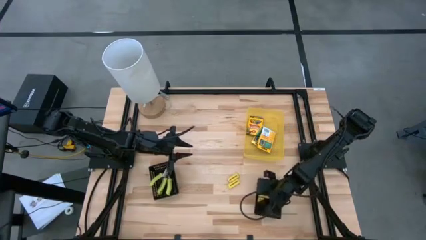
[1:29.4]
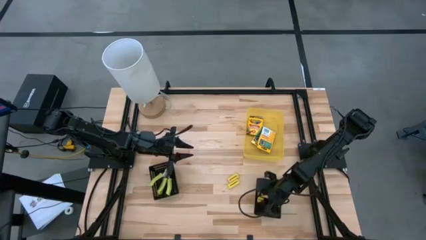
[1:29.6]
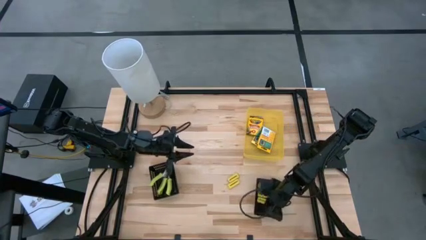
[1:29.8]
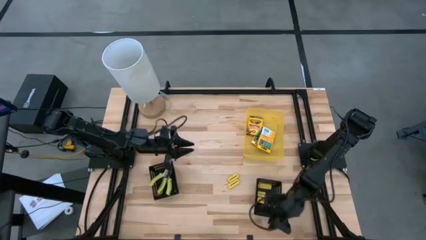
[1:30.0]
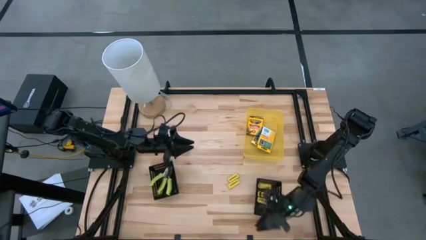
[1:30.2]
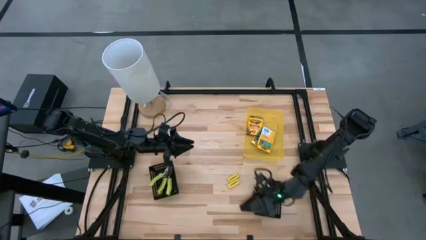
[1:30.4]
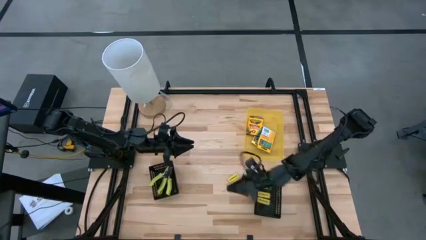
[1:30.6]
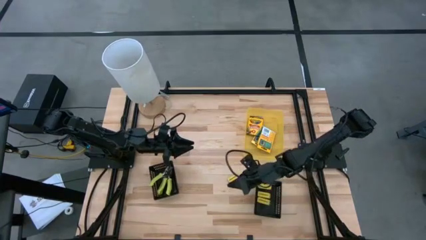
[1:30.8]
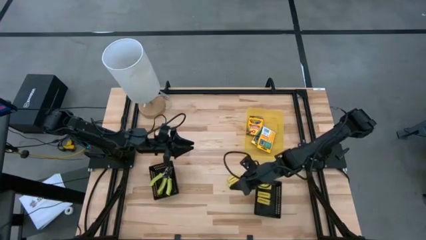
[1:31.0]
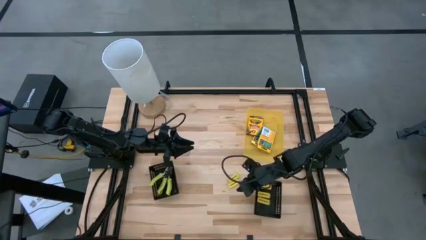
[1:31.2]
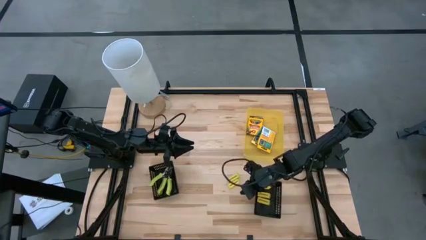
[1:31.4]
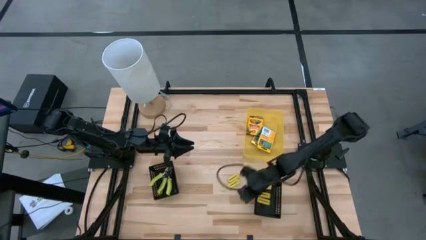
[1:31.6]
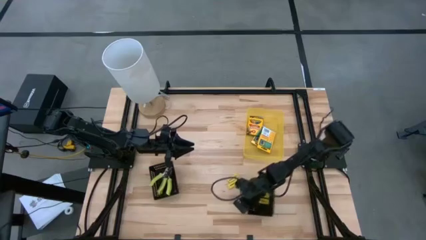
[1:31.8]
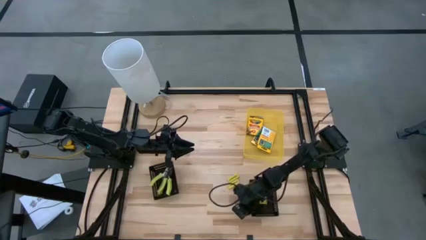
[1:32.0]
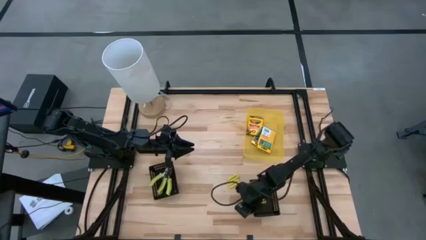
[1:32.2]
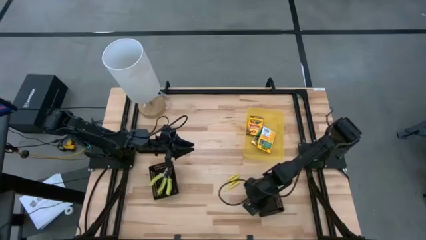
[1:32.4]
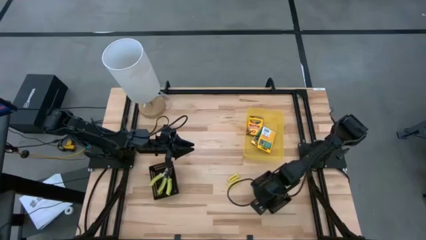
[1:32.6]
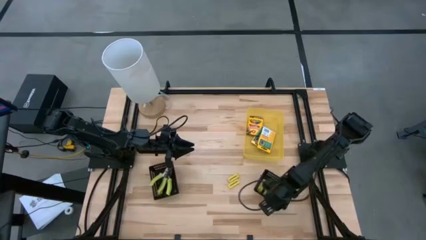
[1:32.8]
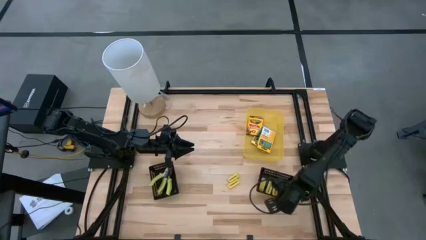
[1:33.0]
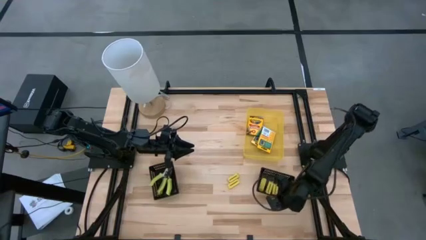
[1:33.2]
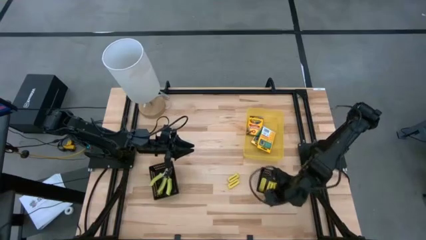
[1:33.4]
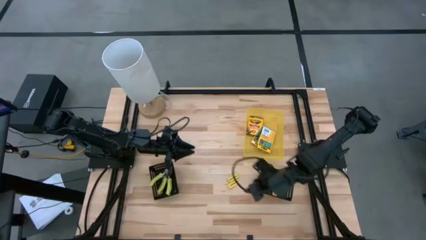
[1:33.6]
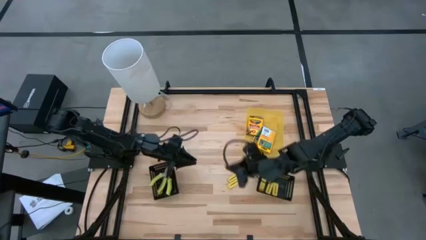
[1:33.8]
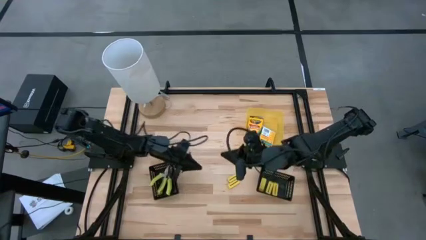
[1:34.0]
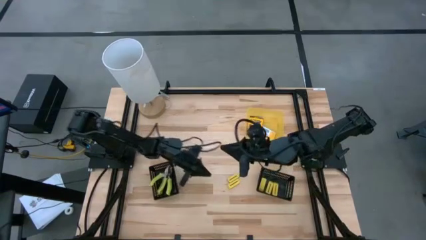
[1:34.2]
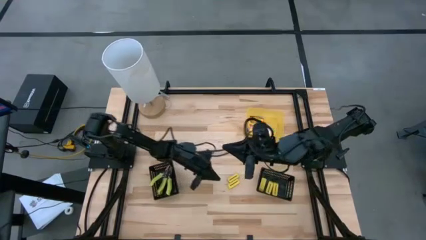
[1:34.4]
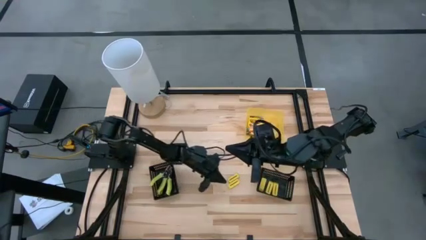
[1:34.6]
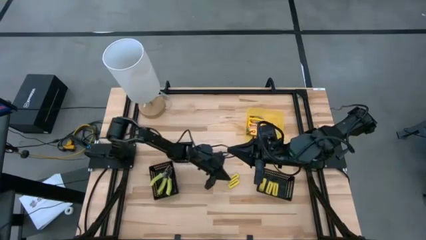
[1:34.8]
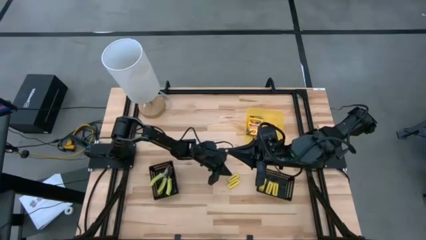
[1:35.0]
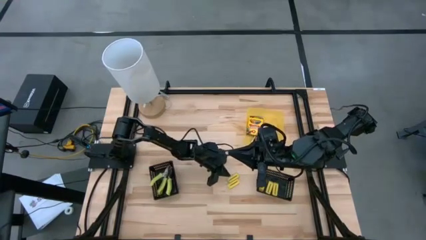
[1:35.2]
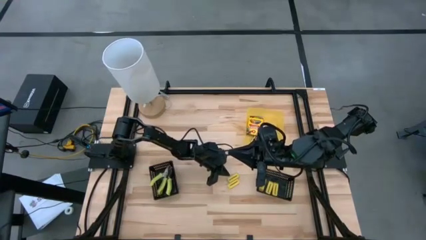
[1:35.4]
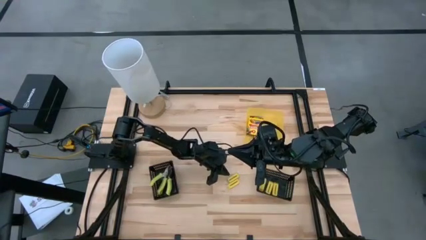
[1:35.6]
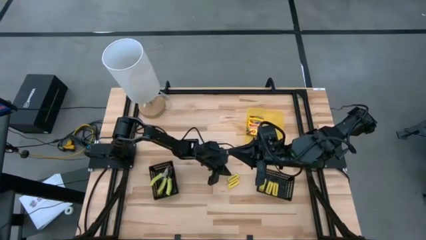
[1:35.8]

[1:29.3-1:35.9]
Task: Pick & Place School Supplies
Adjust the right black bin

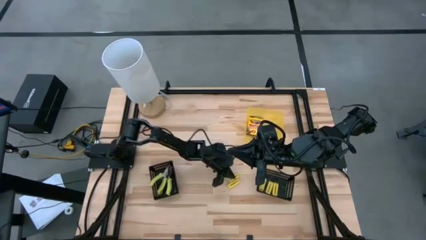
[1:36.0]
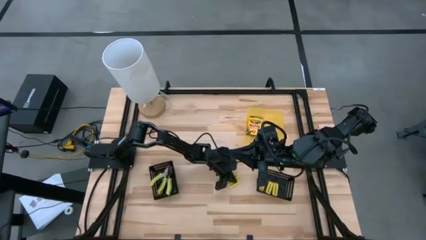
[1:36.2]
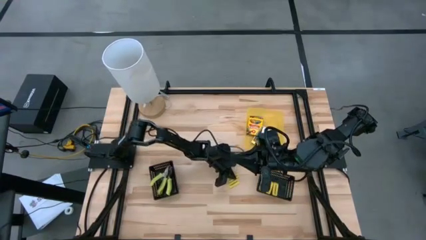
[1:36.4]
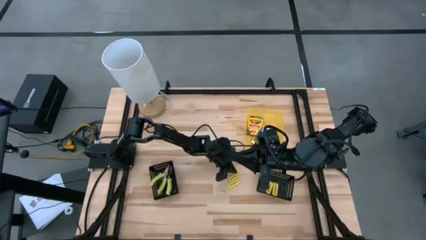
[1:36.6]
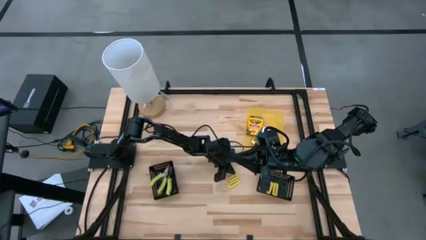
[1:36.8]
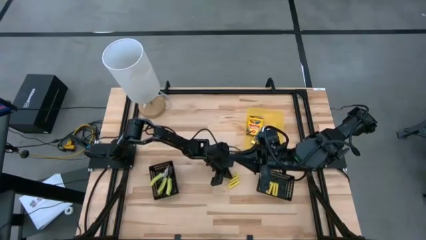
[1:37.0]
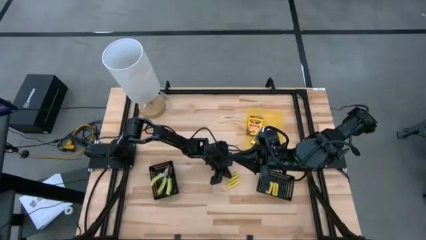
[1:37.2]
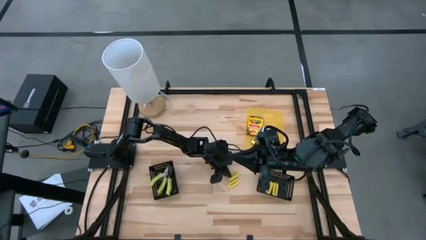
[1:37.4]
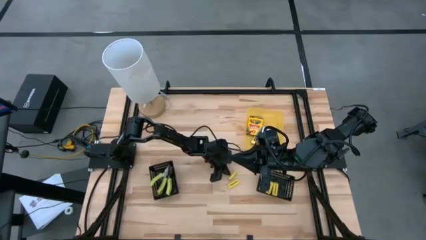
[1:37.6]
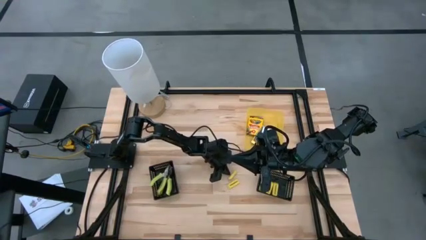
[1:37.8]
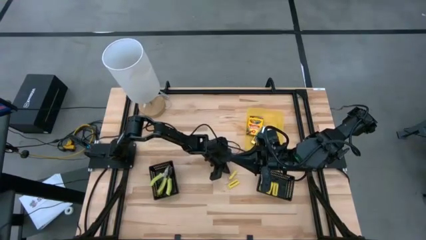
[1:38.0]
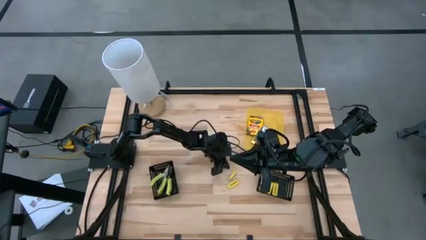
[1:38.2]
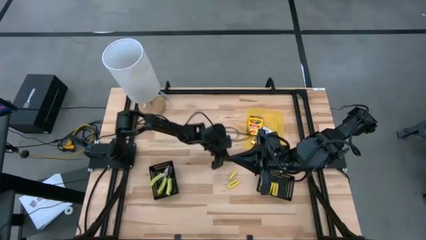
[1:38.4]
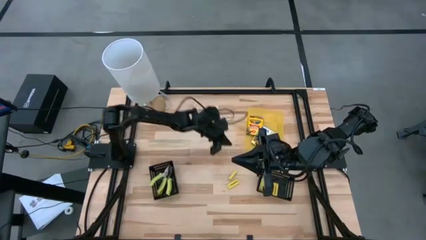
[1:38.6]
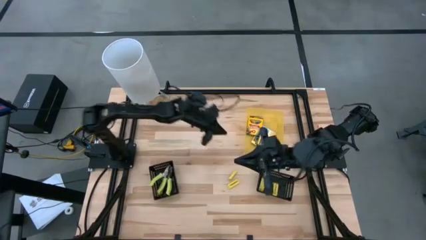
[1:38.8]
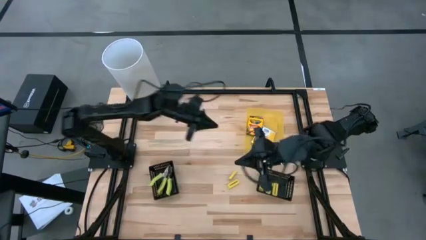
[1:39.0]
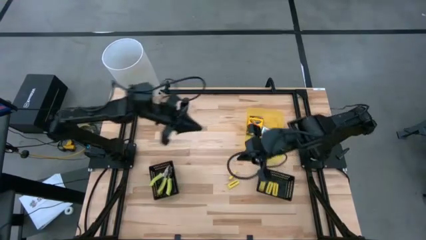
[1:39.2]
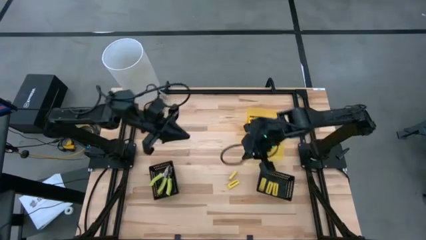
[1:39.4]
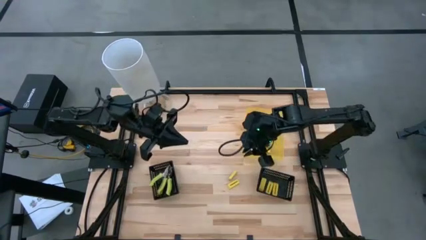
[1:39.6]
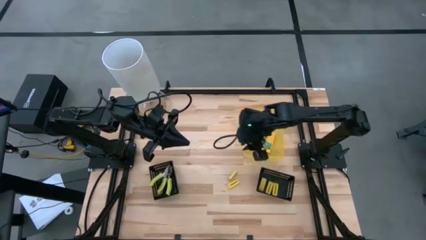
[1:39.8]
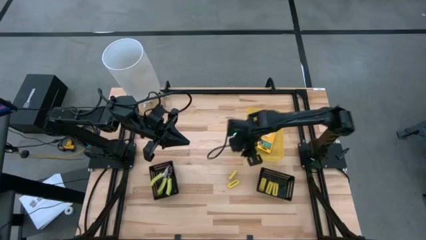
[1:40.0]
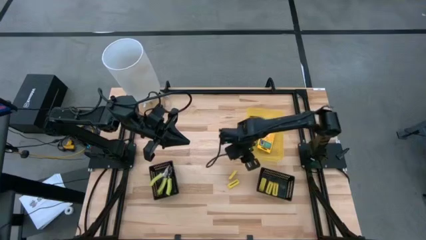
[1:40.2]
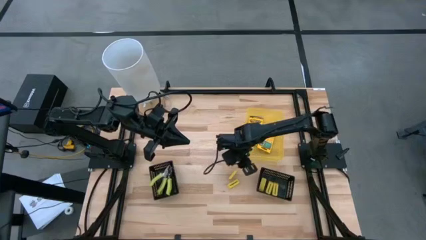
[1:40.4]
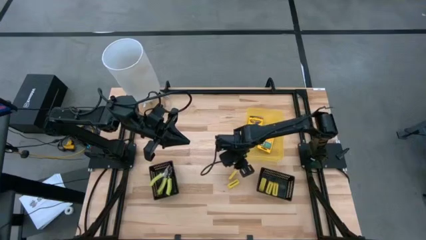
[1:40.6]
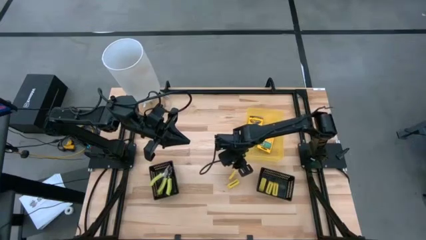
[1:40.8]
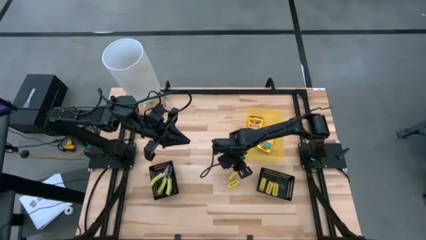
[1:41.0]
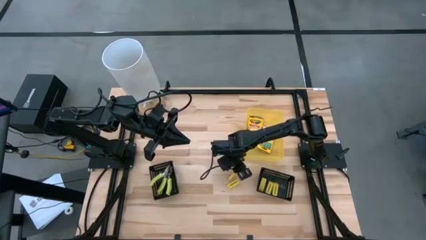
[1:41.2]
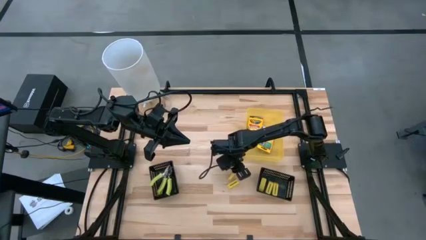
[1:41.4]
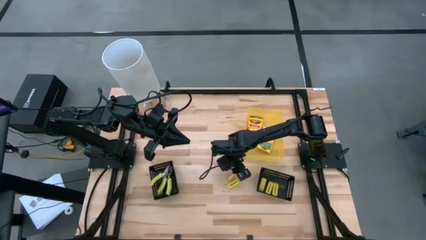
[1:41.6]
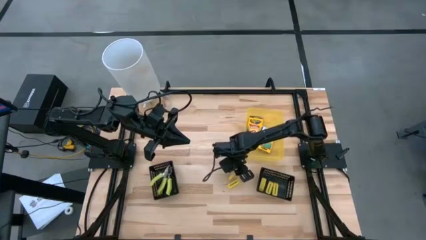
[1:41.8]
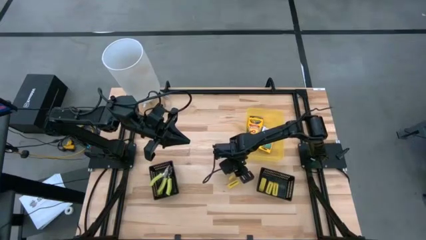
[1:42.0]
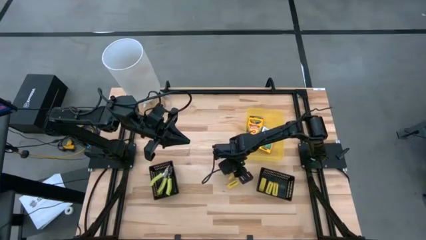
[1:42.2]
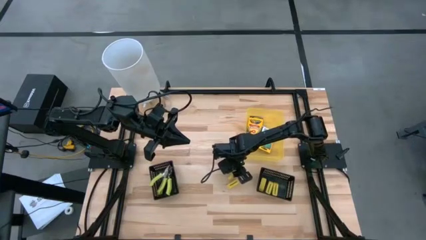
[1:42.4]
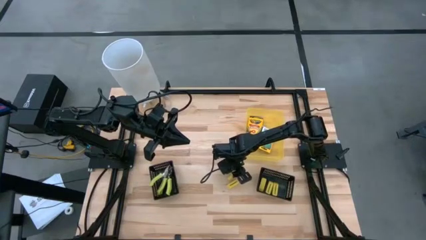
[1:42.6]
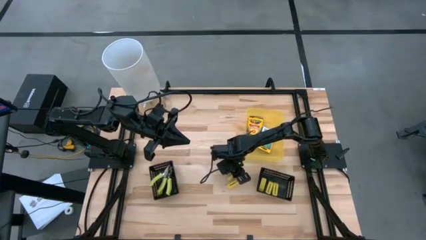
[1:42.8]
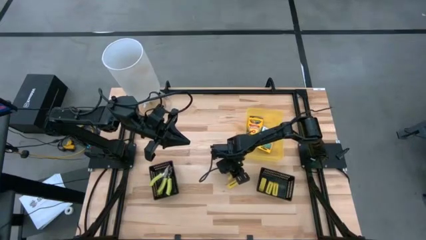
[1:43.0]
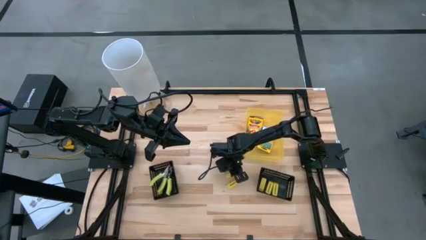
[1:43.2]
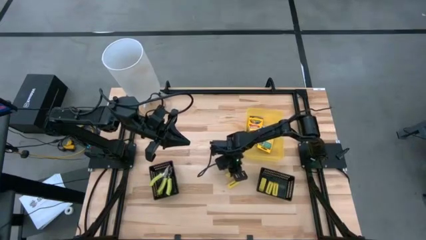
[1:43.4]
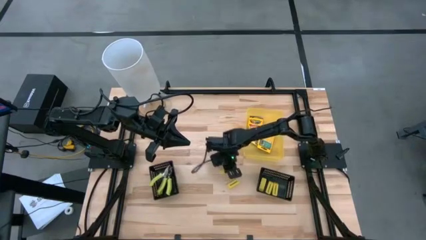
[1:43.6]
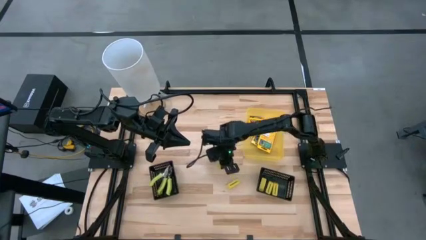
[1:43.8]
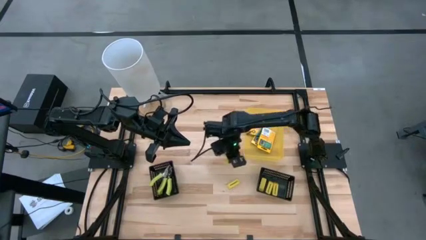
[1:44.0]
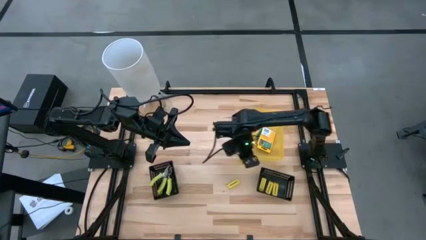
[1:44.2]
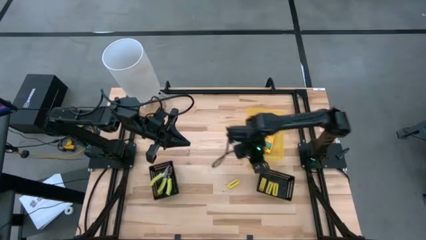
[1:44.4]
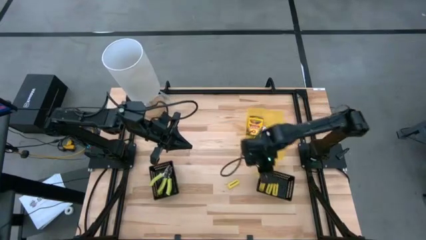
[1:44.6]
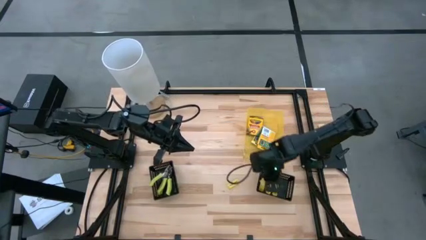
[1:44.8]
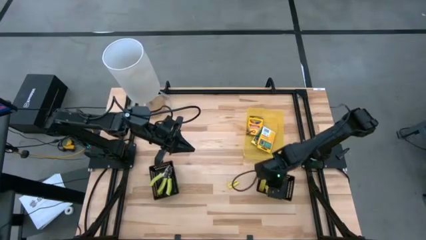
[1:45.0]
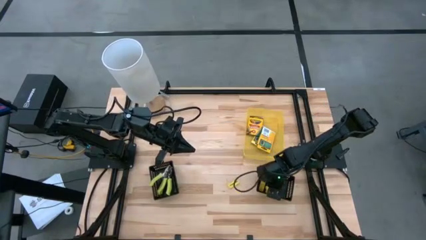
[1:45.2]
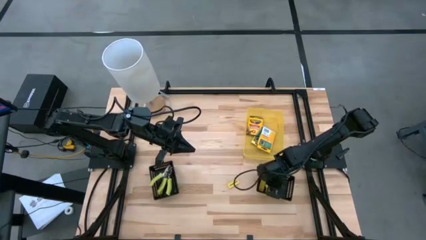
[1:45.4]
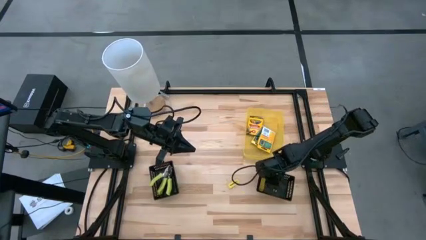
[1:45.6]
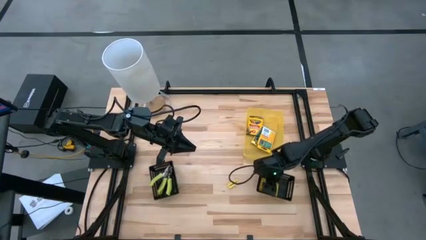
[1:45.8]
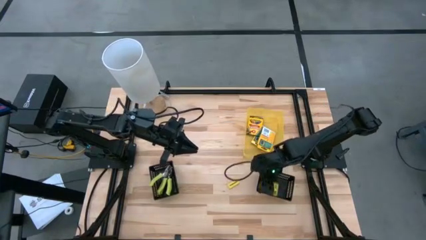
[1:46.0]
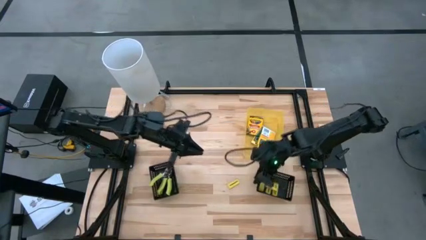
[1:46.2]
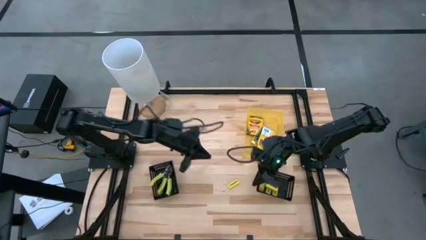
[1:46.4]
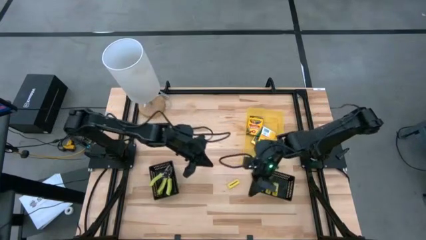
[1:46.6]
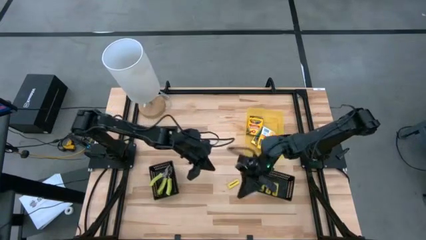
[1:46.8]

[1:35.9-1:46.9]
Put the eraser into the right black bin
